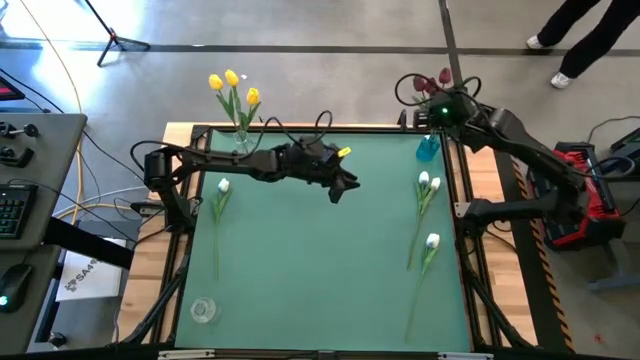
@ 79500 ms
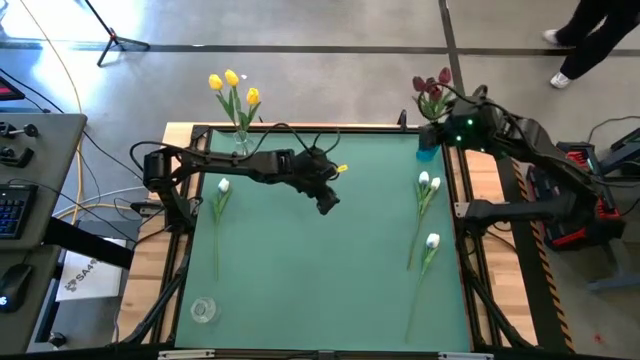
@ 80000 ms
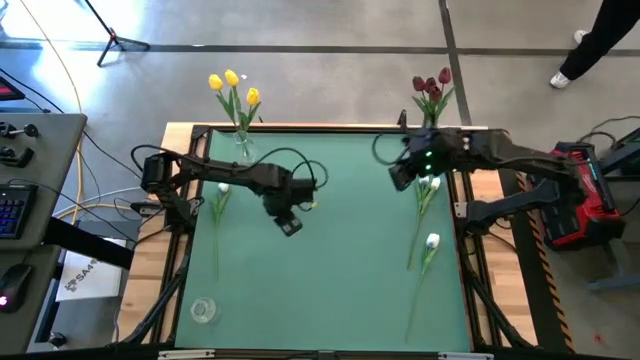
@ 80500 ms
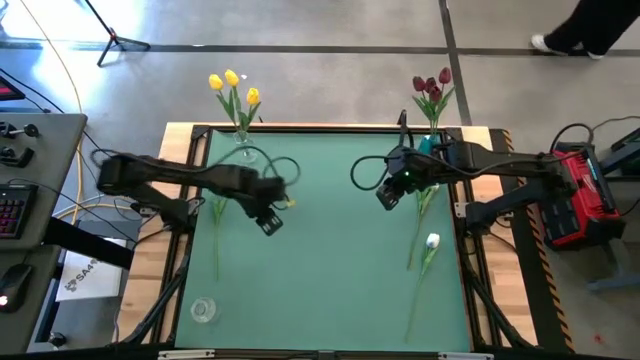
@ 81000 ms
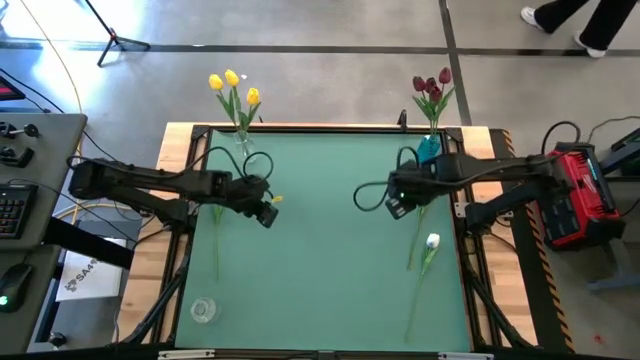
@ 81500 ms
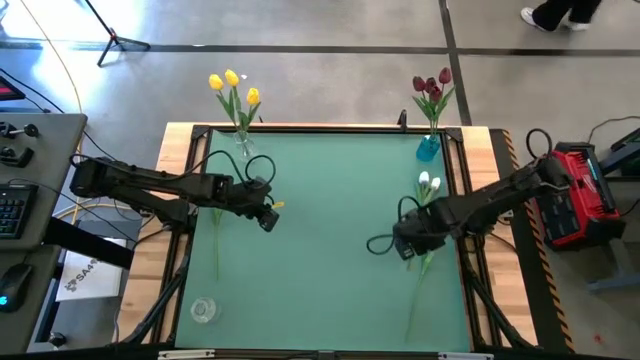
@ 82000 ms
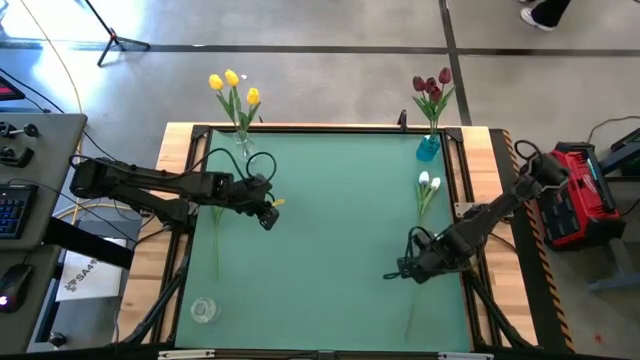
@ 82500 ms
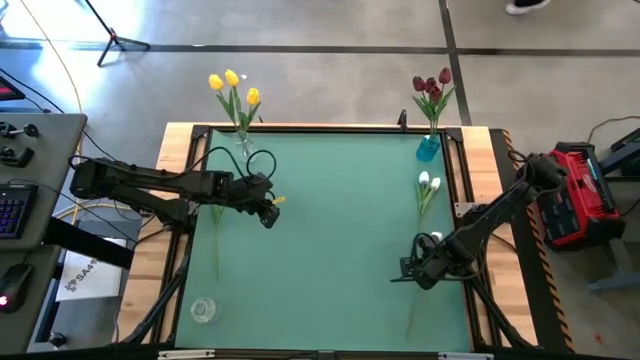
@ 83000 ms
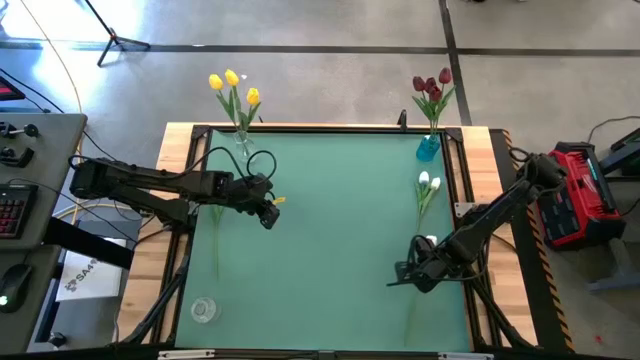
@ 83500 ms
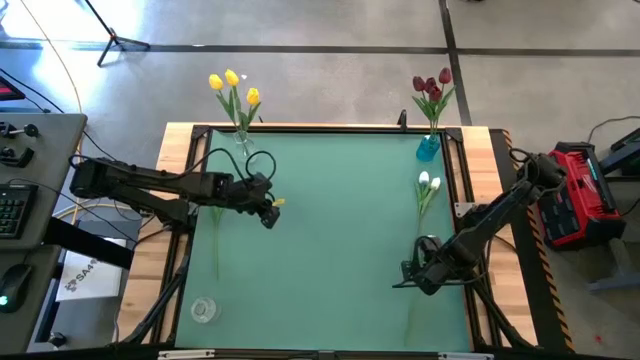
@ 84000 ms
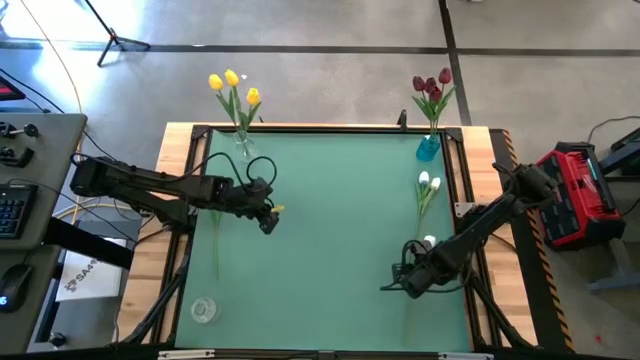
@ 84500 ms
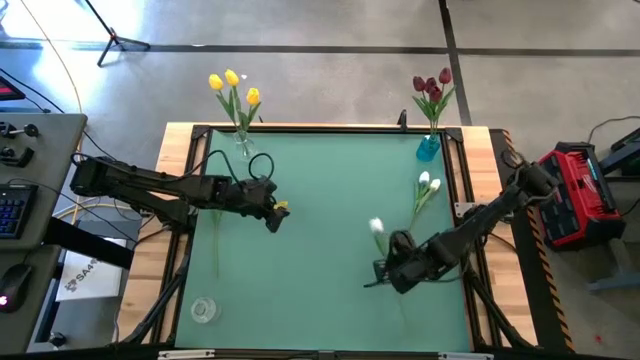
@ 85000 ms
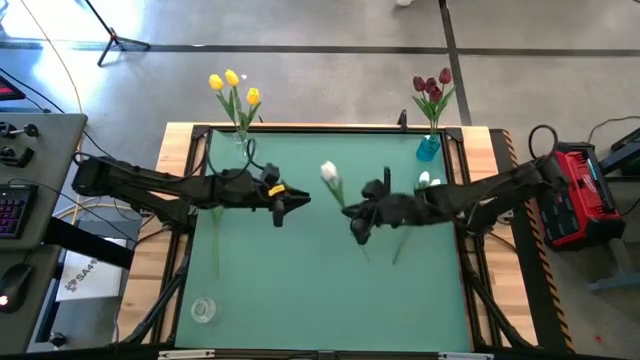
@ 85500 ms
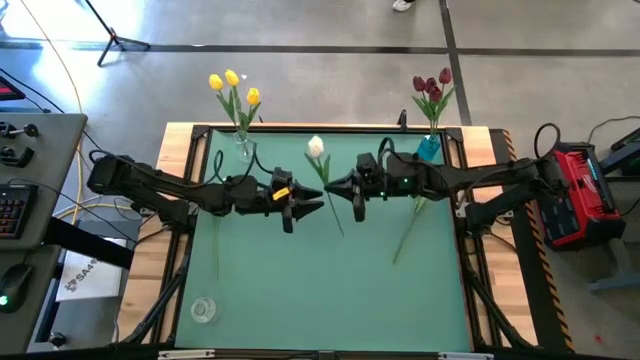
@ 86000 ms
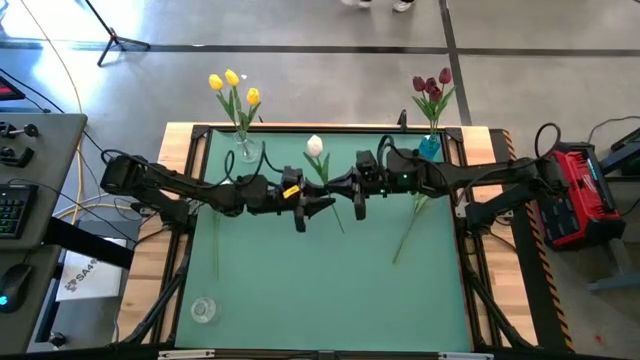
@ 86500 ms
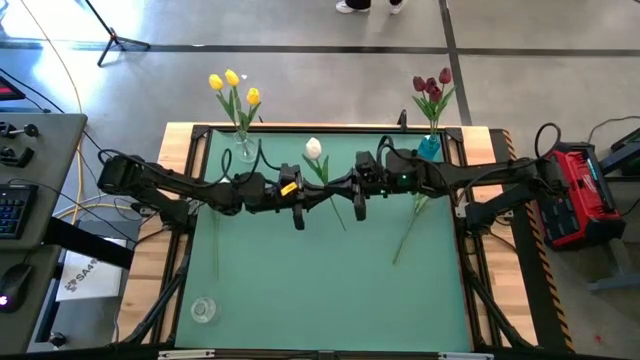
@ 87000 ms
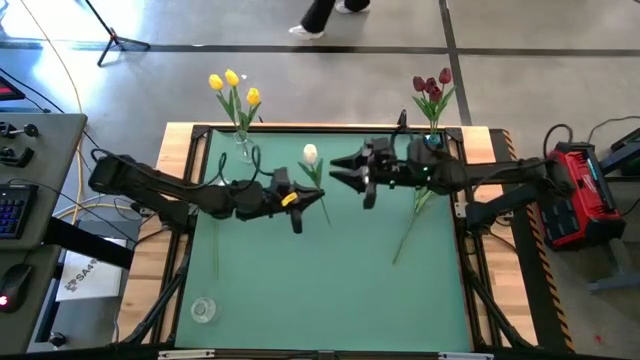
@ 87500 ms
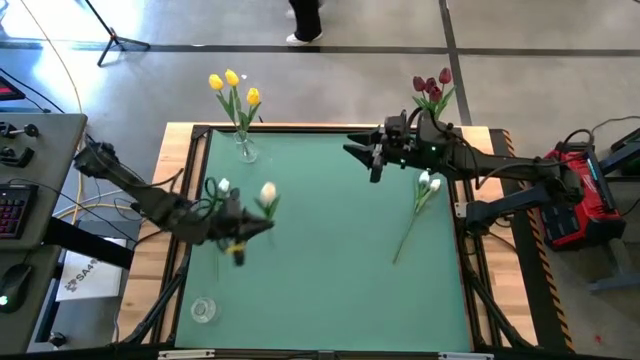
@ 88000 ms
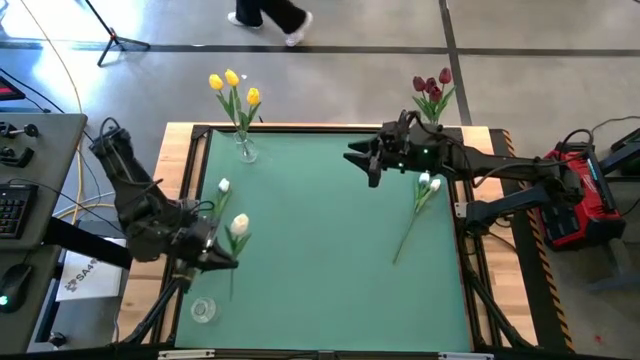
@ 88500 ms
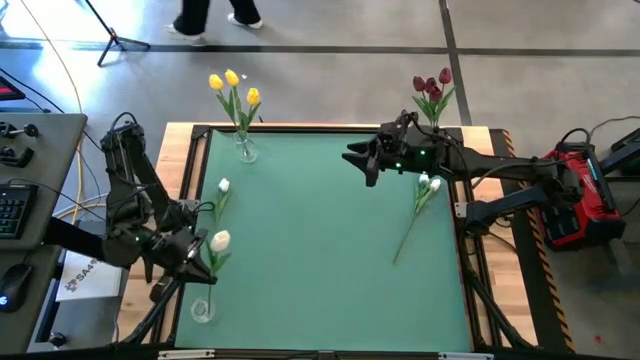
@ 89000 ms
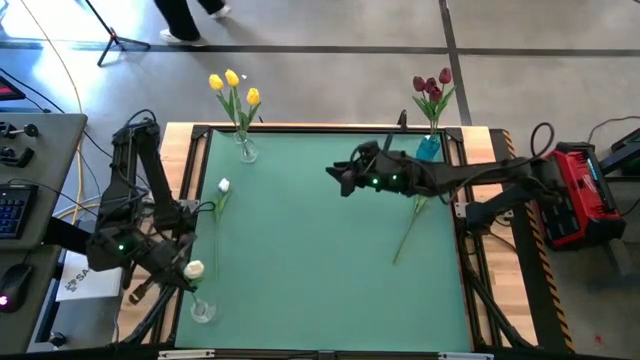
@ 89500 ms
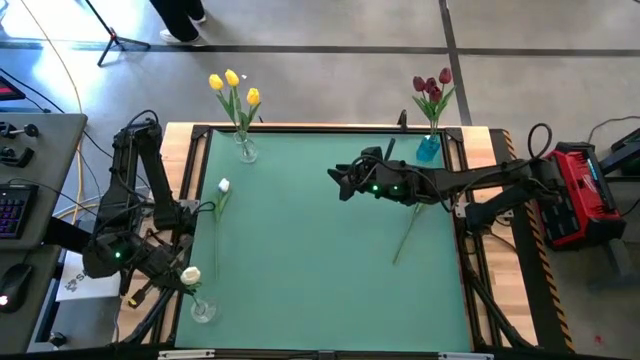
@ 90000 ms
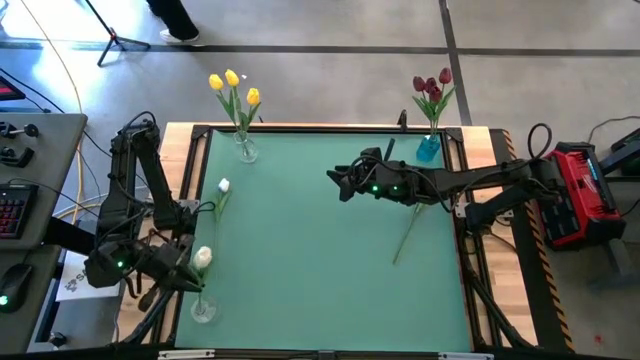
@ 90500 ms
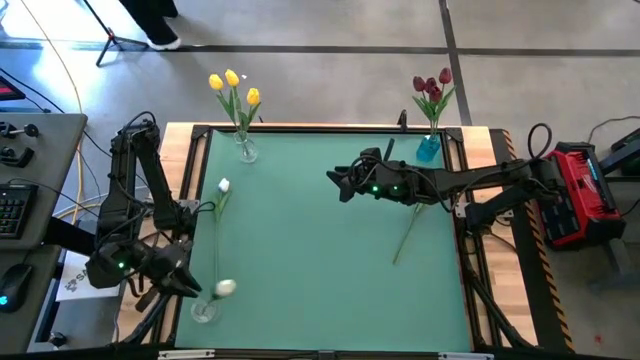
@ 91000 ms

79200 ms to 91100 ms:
Task: Sort flowers into vase by color
Put the bottom right white tulip into the bottom transparent vase

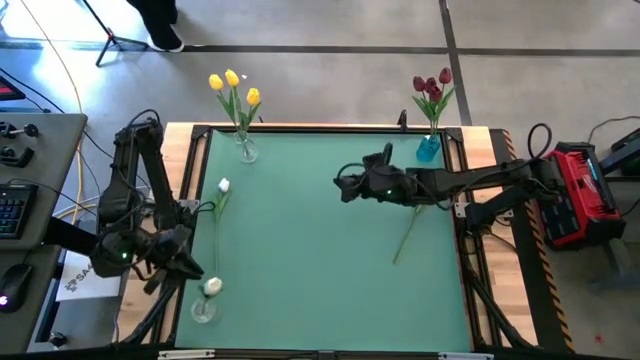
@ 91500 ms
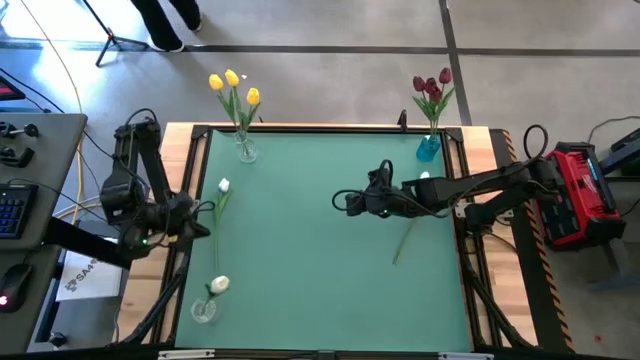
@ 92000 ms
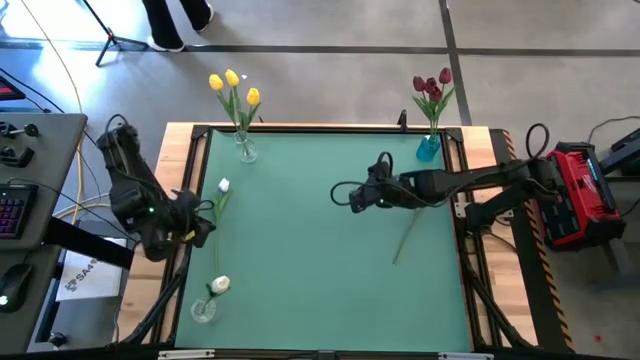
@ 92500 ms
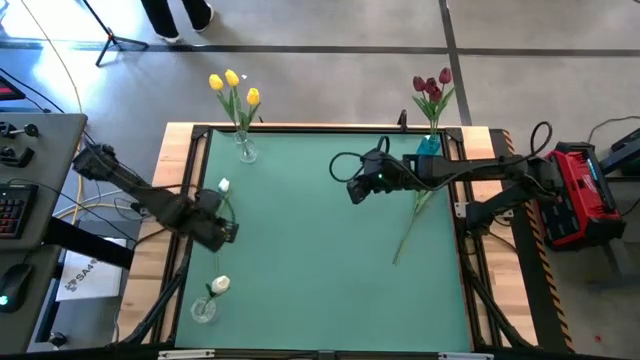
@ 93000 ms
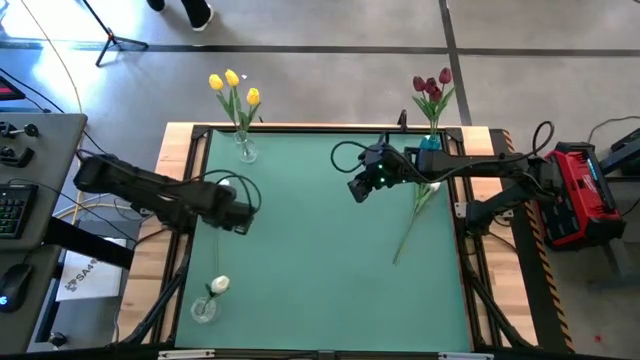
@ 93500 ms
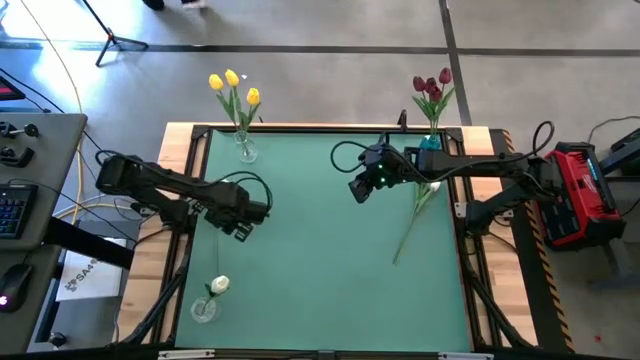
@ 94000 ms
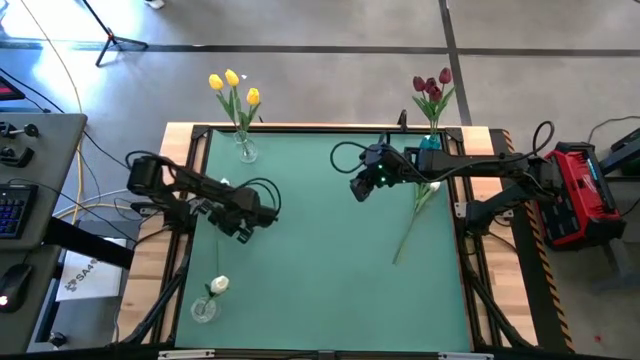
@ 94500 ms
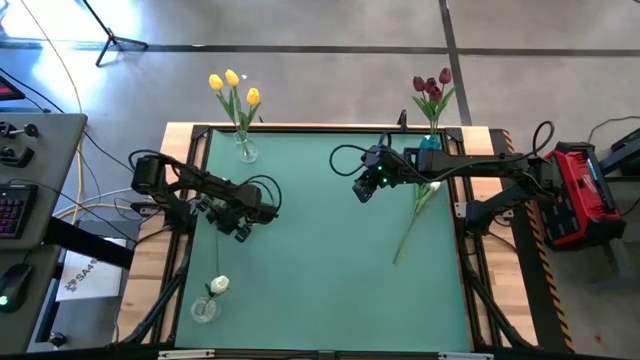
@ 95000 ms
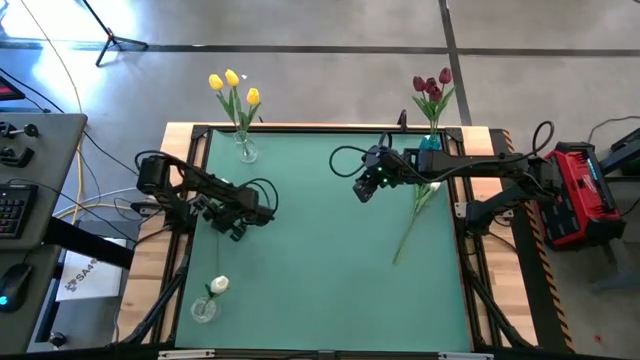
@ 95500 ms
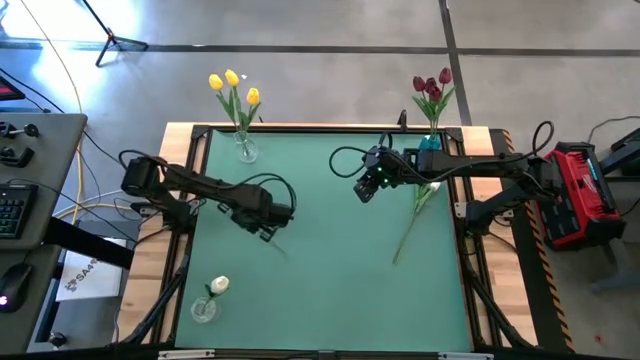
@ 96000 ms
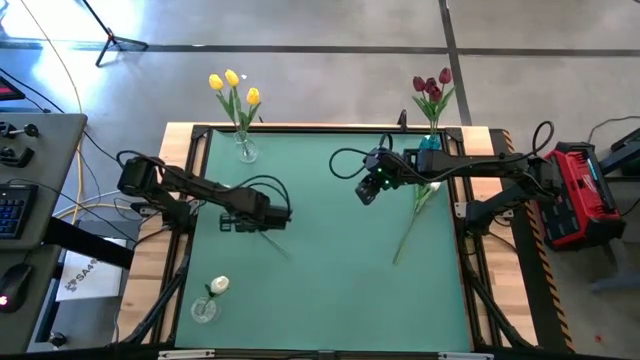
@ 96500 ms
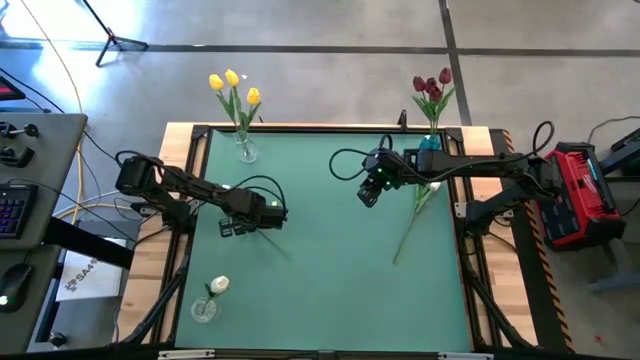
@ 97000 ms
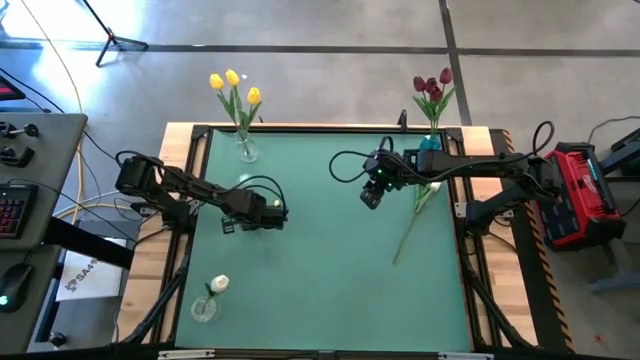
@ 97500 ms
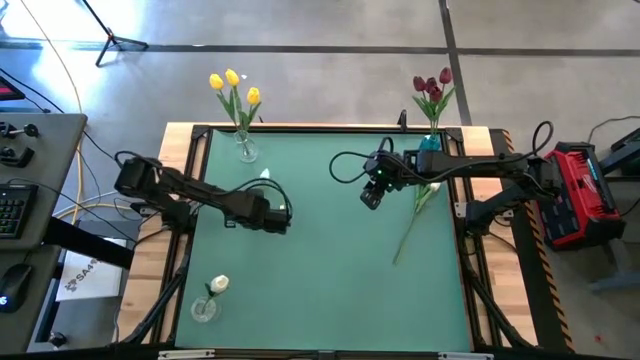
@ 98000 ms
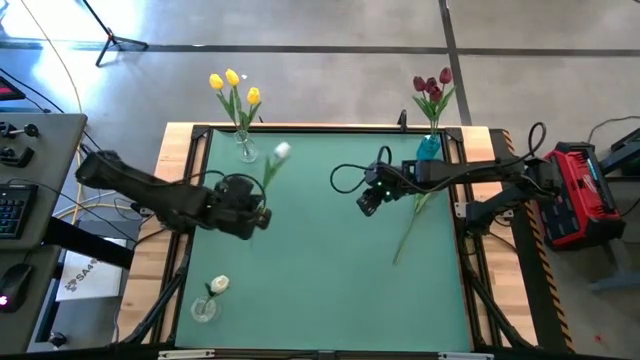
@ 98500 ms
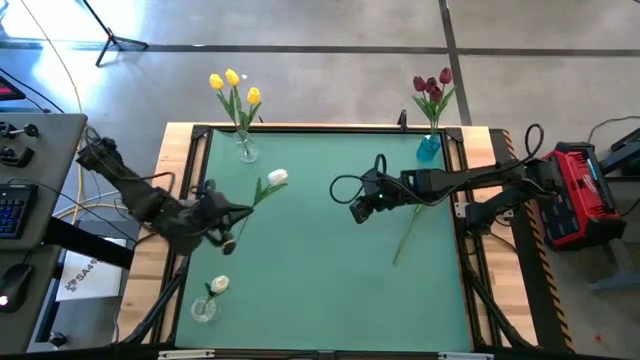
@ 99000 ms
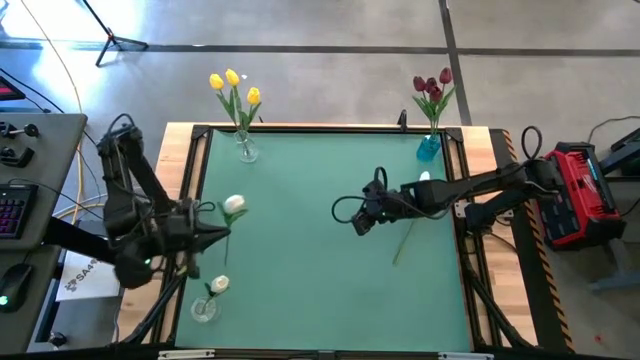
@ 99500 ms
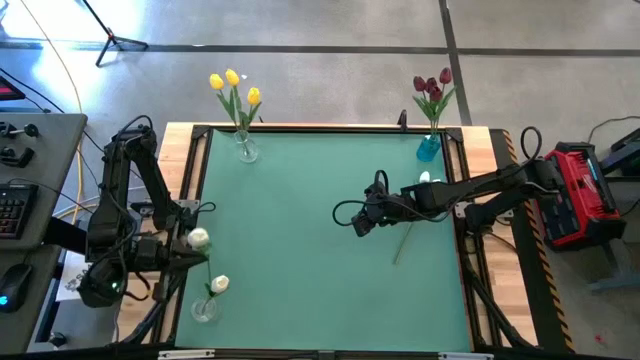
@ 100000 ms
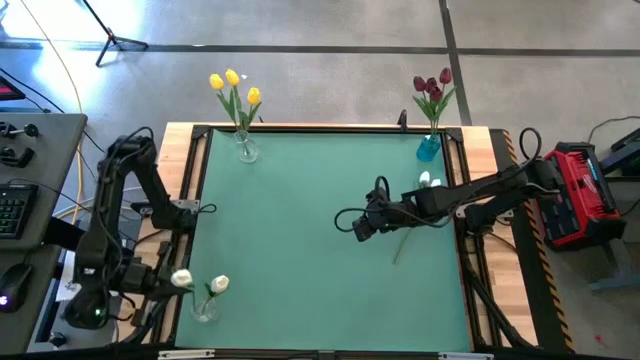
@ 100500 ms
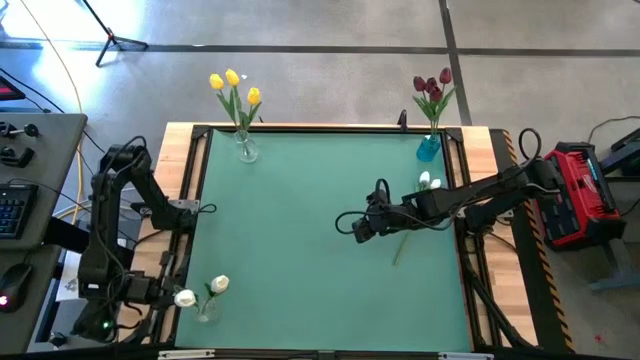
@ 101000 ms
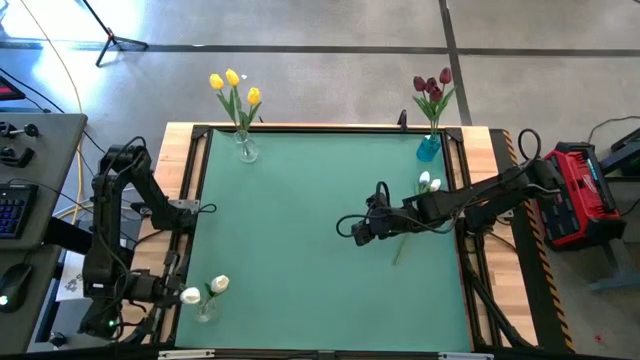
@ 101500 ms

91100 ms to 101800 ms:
Put the left white tulip into the bottom transparent vase
